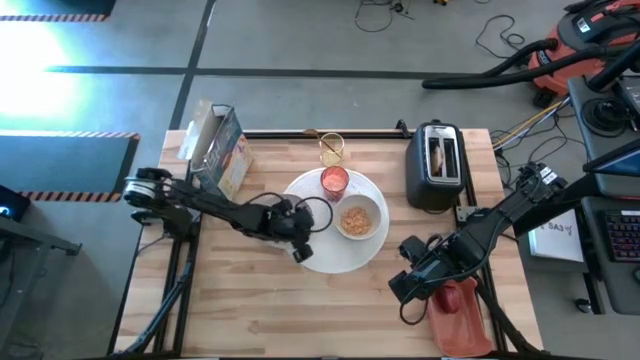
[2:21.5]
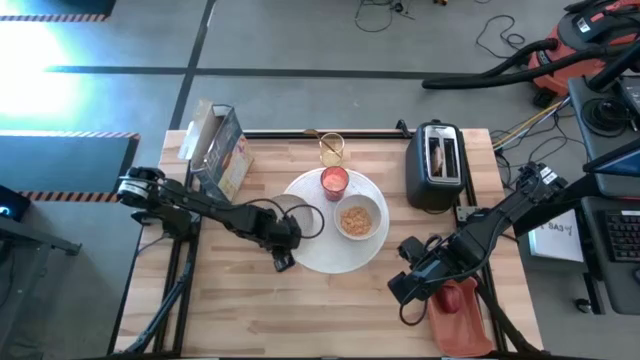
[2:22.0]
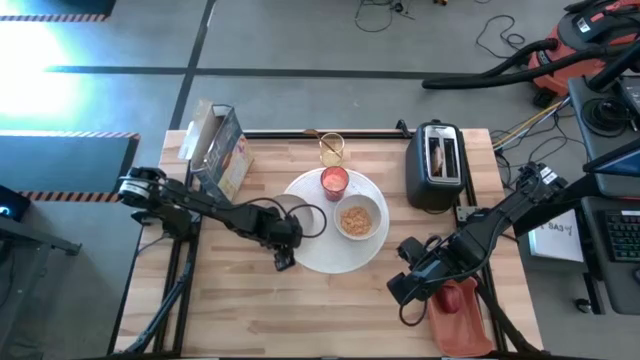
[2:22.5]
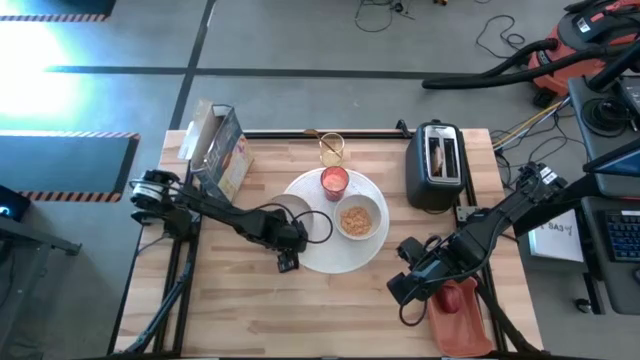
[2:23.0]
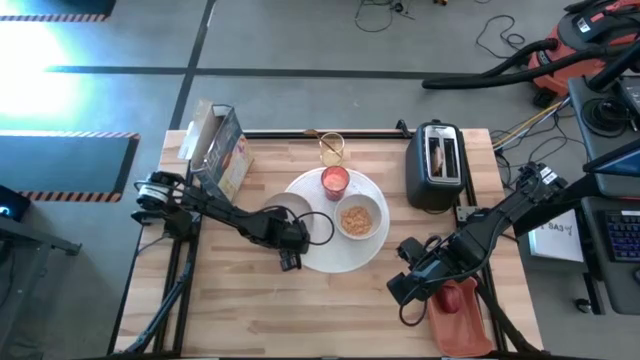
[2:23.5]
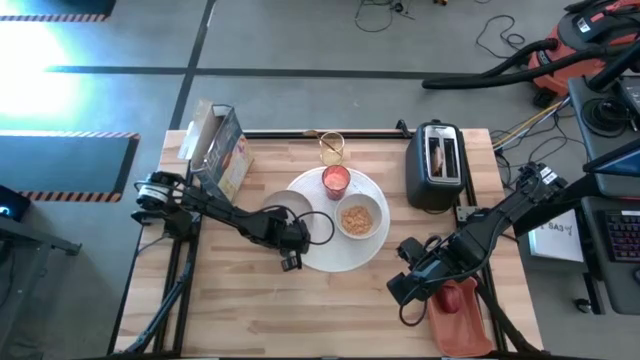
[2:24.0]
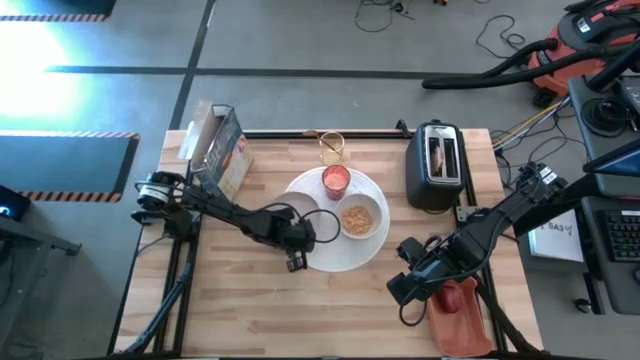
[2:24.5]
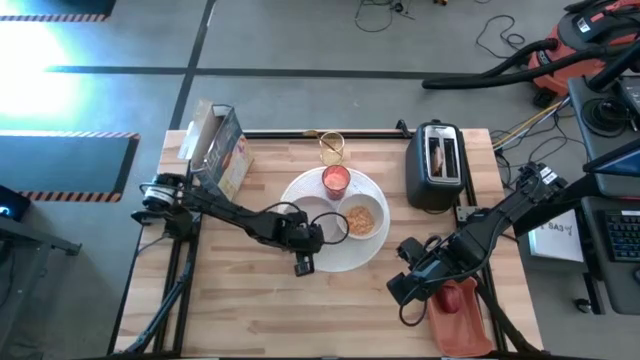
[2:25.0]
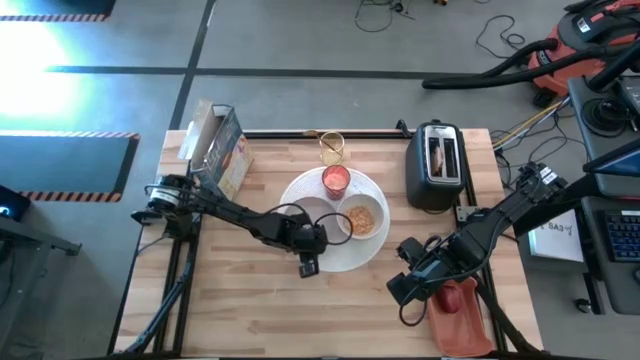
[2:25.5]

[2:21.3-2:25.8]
Task: Arrange a breakfast setting
Adjust the plate

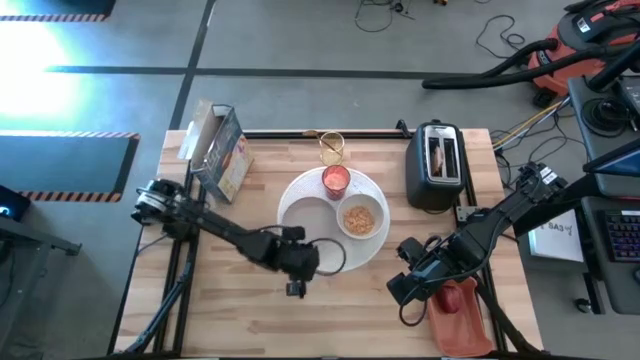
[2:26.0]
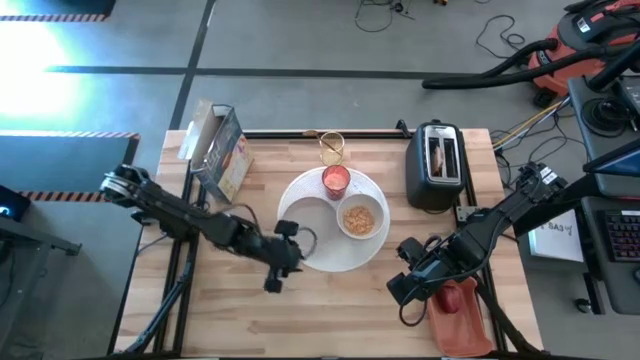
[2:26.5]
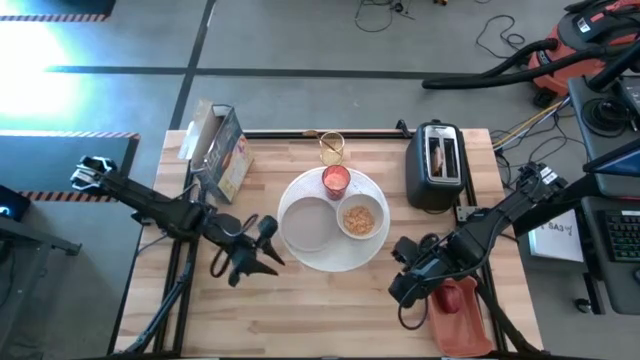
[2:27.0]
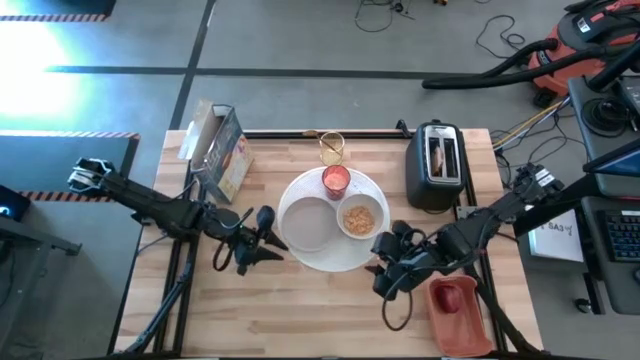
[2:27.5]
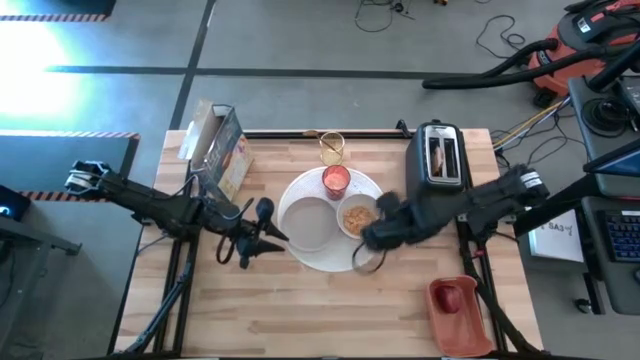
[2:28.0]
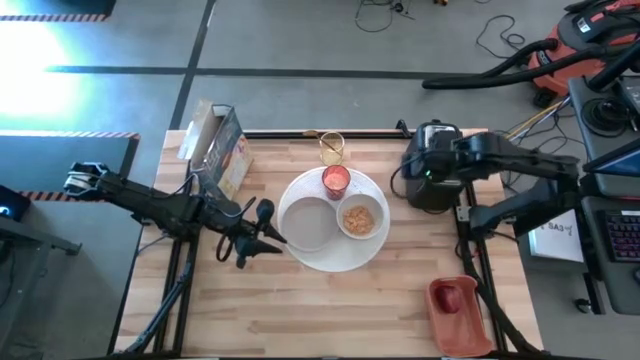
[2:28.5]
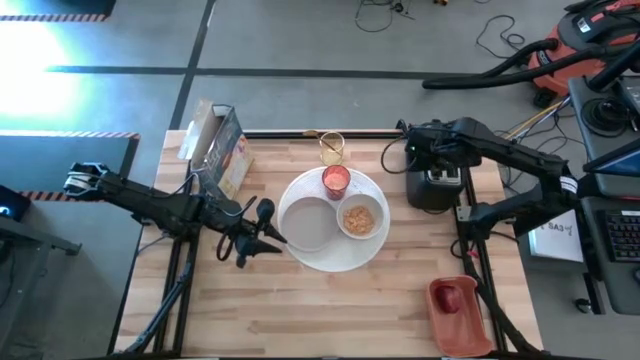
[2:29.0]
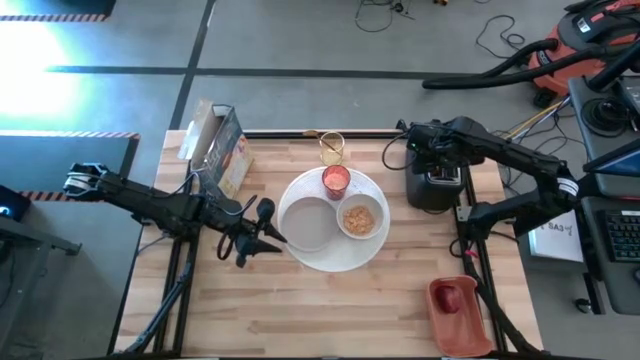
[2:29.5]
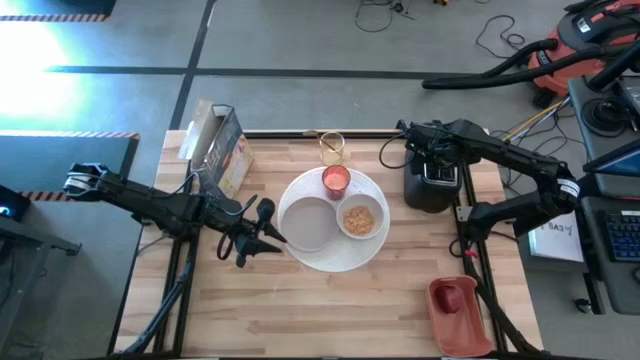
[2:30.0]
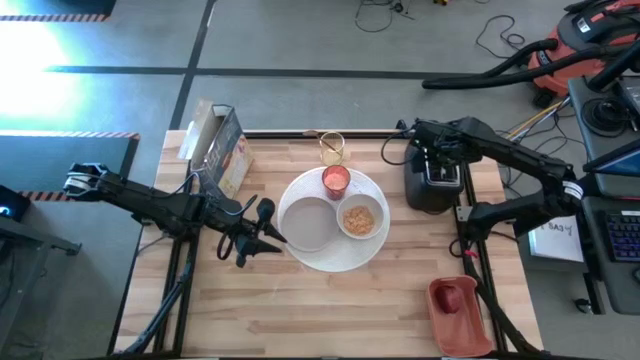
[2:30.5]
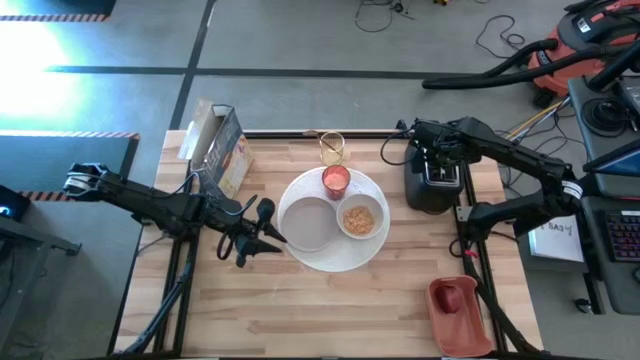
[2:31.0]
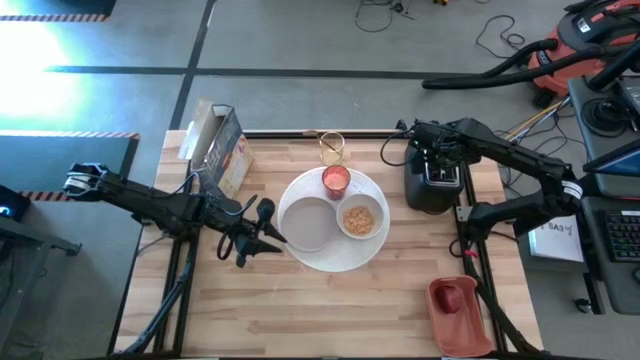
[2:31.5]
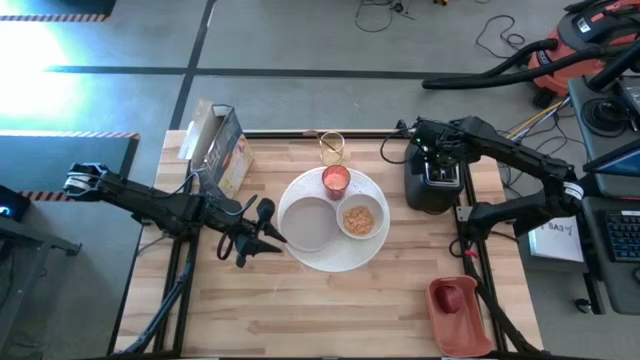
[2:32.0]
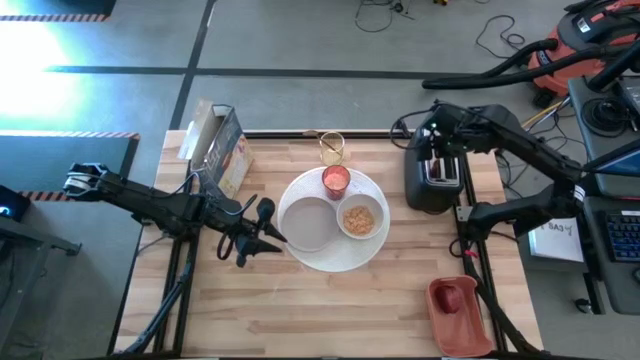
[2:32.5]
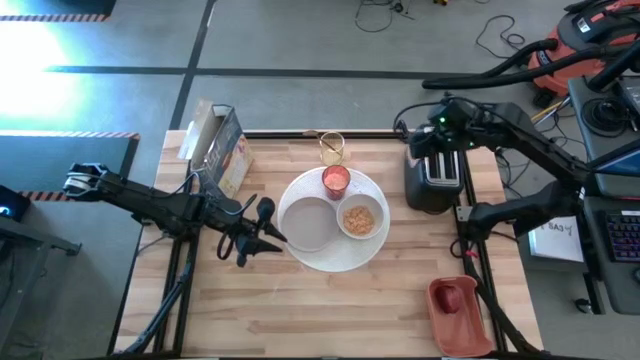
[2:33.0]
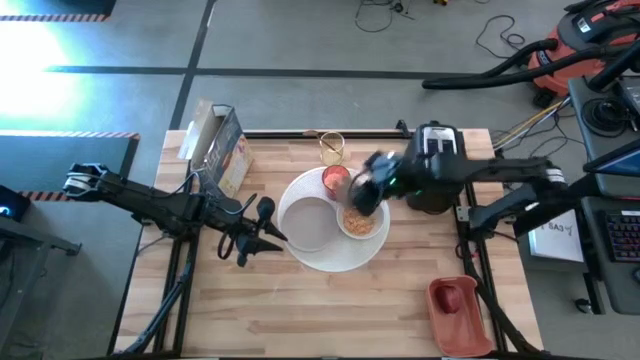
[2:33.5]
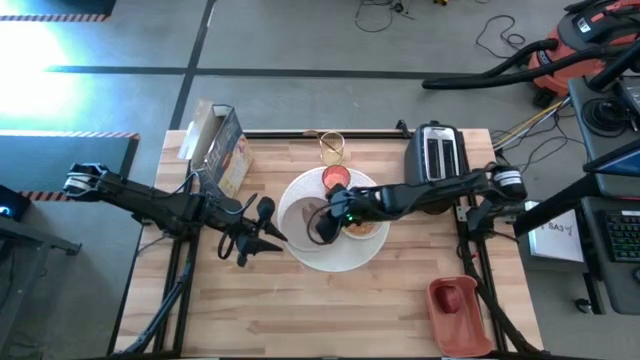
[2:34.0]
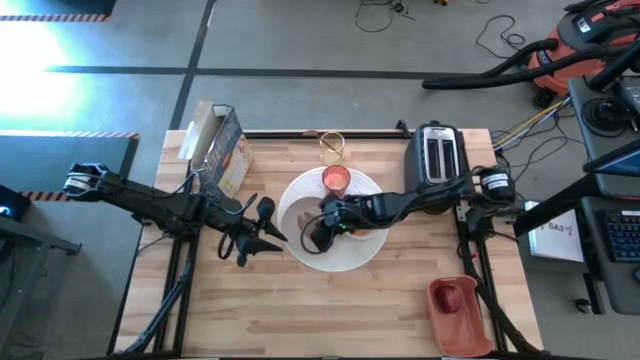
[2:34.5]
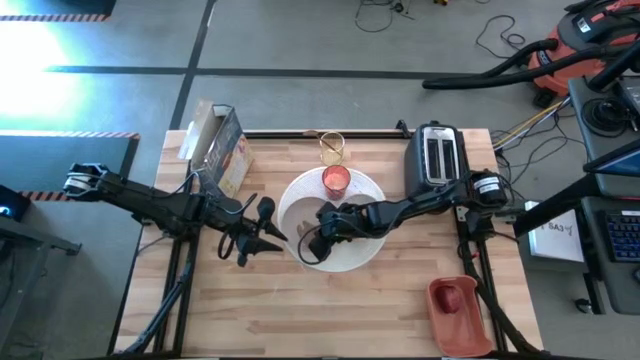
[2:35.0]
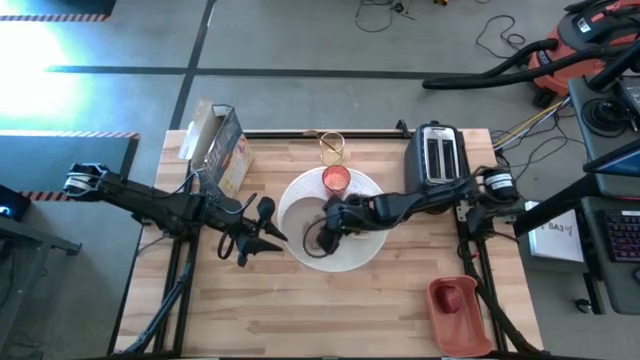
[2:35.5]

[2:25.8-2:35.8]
Put the bread on the plate

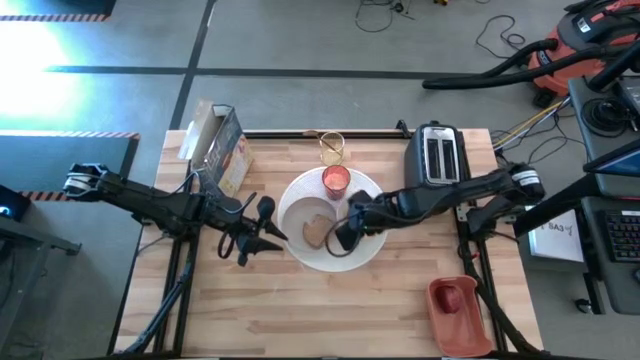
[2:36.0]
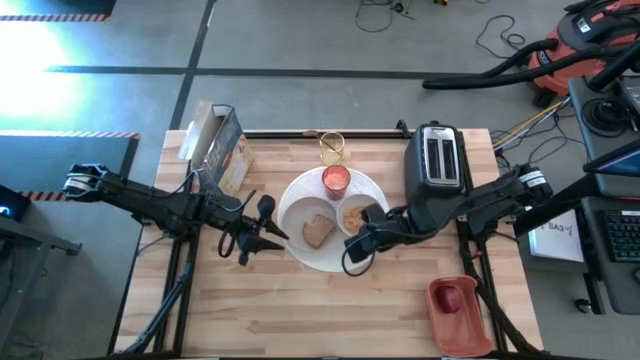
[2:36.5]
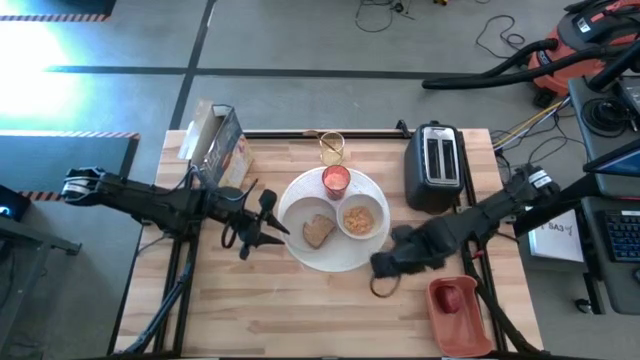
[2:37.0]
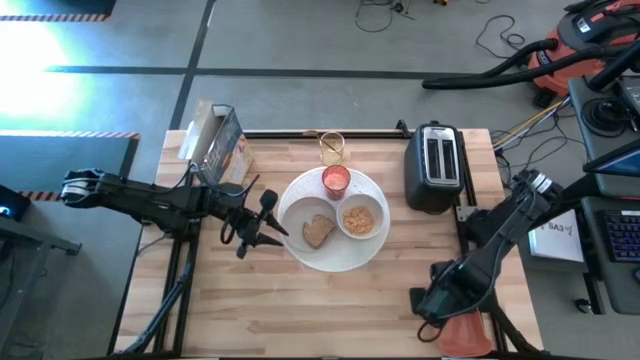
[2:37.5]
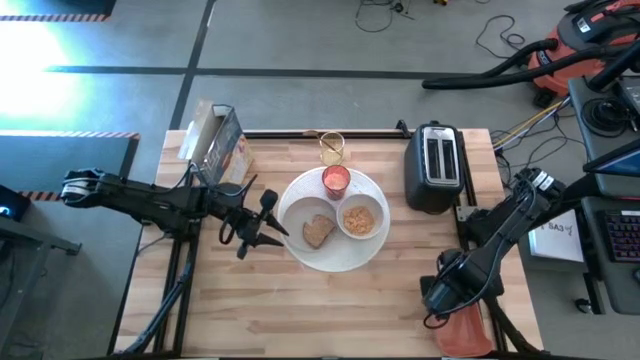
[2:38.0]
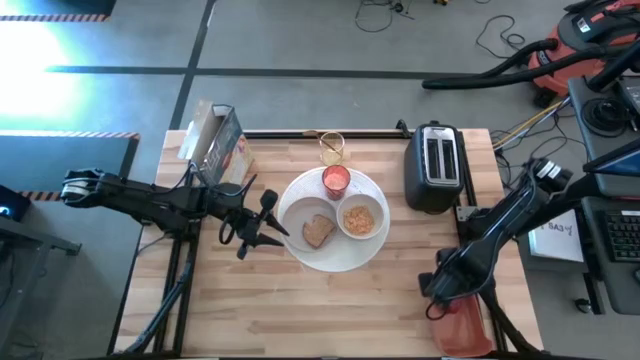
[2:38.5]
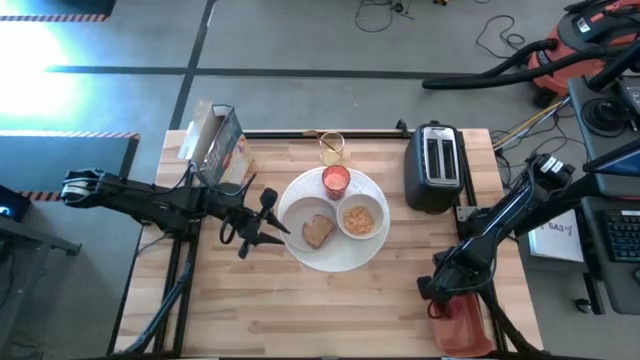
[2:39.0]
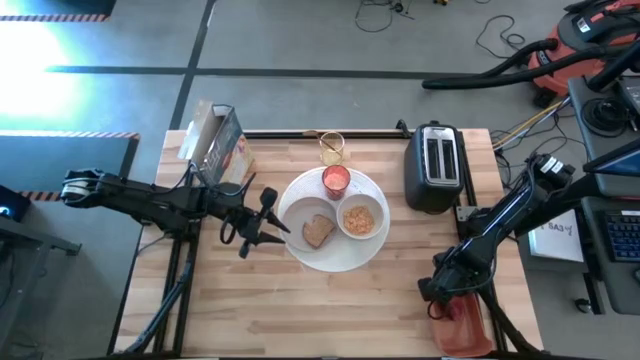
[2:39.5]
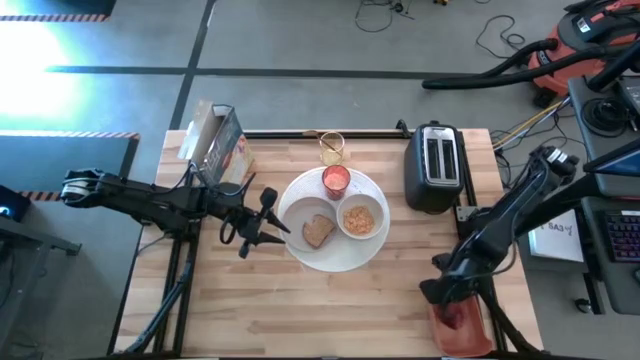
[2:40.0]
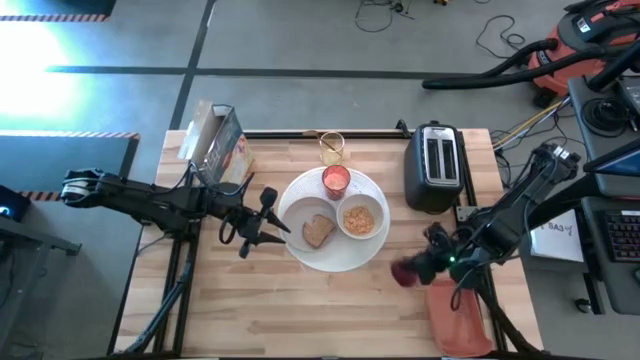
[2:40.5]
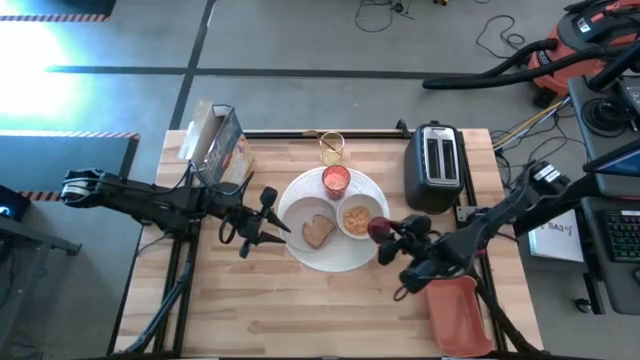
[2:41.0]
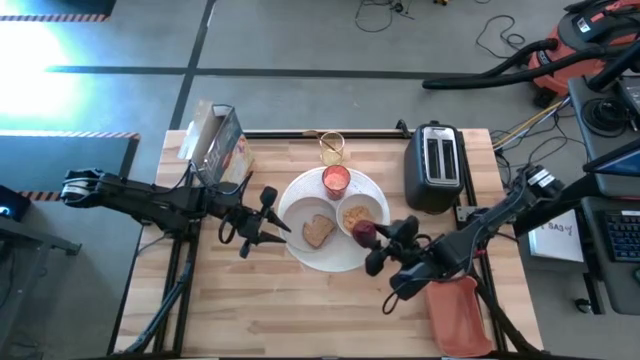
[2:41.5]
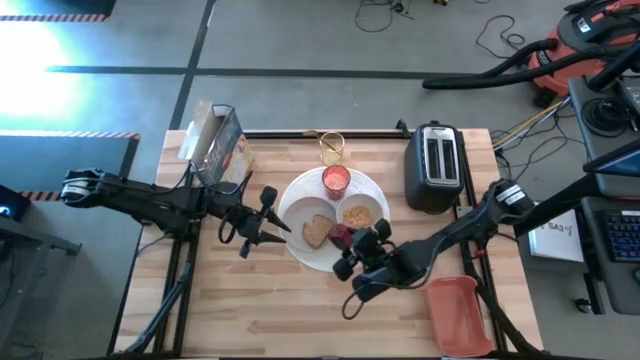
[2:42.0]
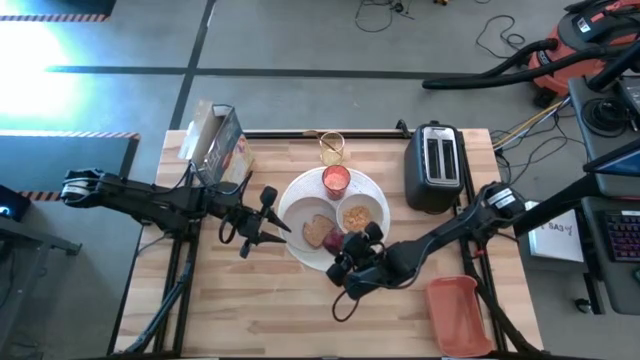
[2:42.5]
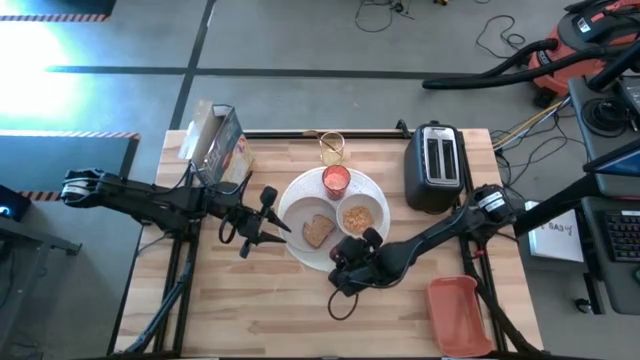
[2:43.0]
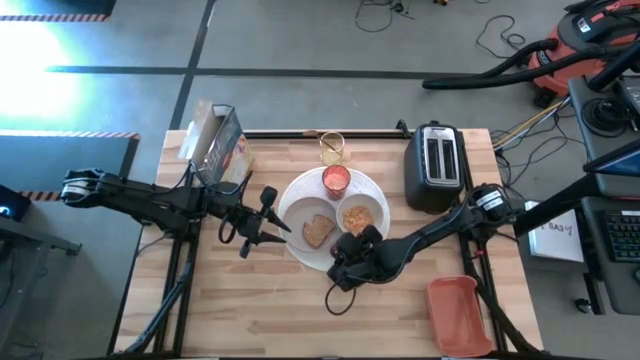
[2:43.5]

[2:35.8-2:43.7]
Put the apple on the placemat
